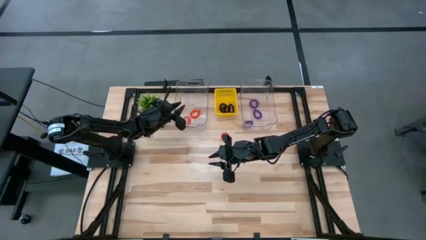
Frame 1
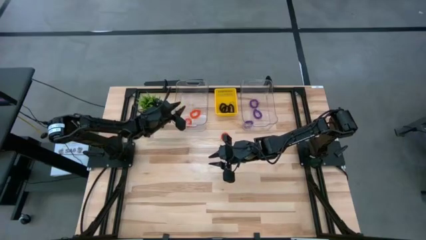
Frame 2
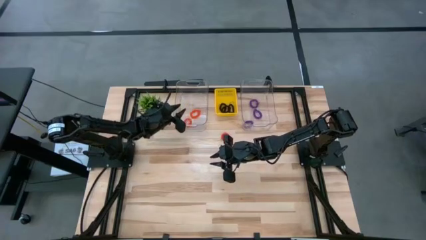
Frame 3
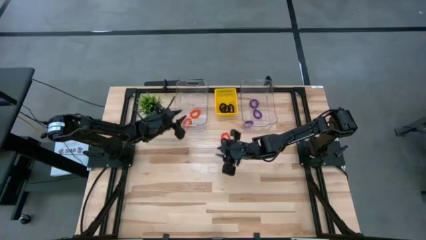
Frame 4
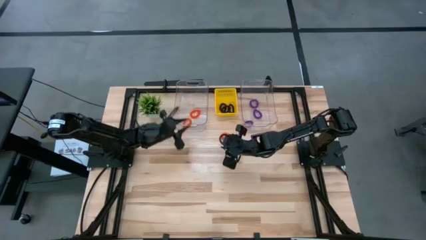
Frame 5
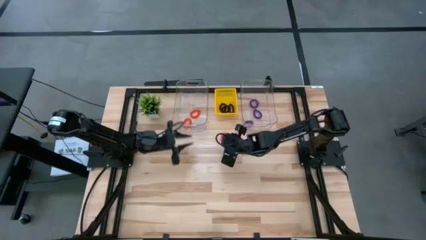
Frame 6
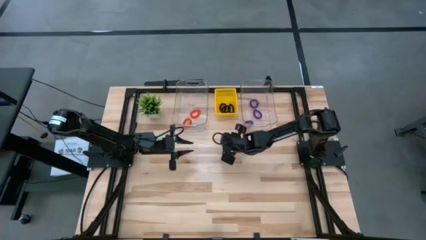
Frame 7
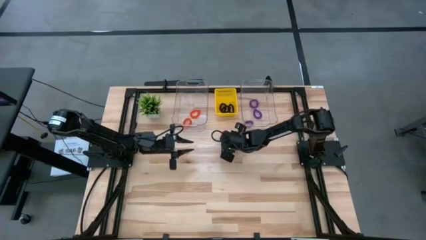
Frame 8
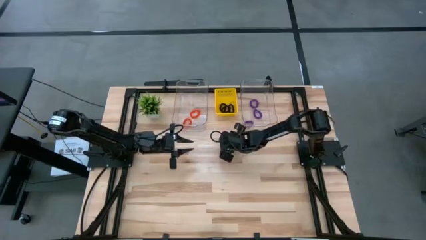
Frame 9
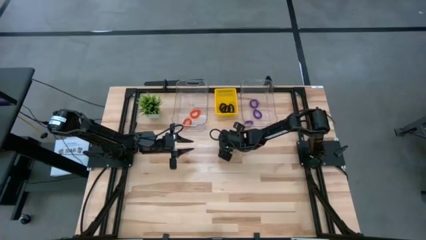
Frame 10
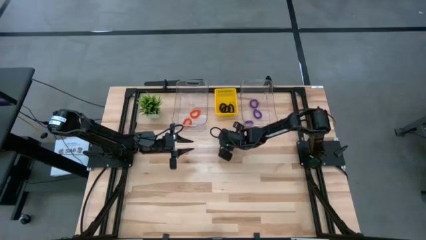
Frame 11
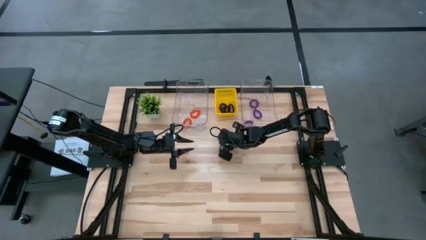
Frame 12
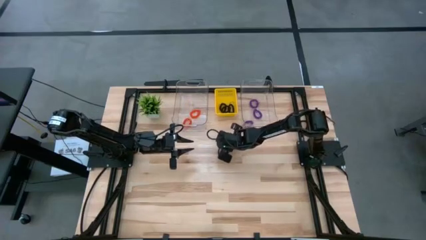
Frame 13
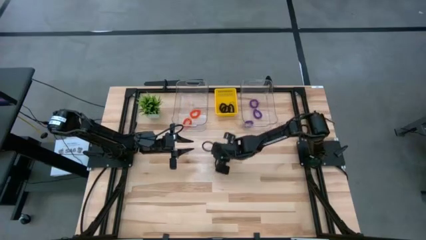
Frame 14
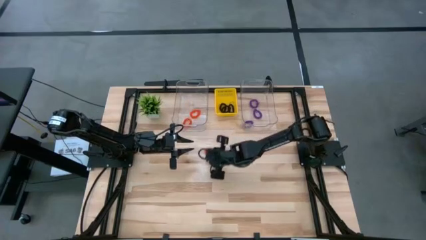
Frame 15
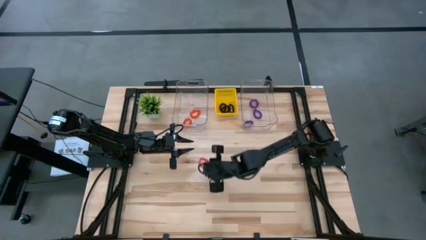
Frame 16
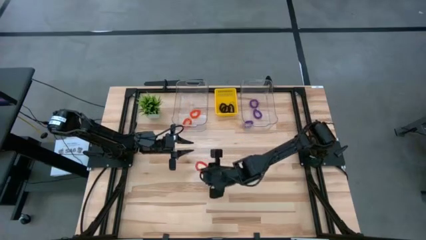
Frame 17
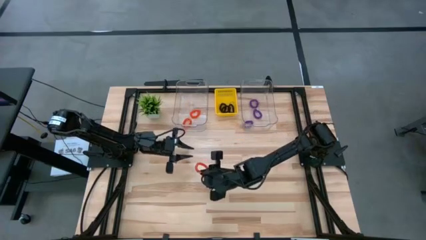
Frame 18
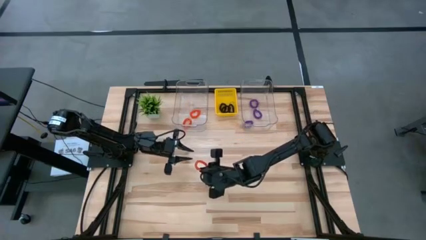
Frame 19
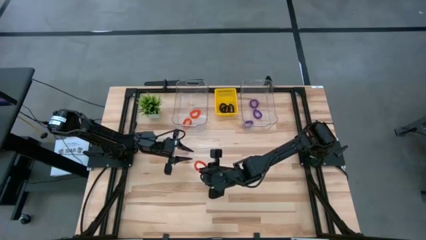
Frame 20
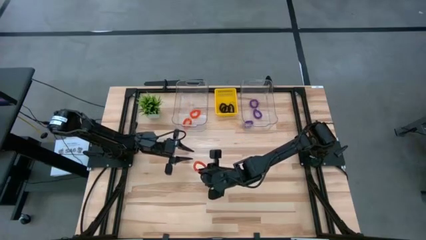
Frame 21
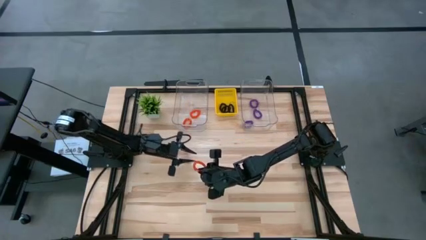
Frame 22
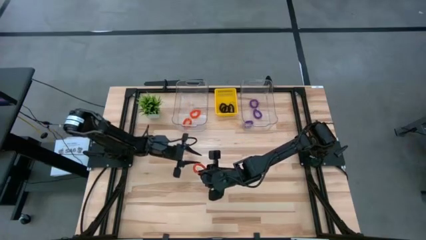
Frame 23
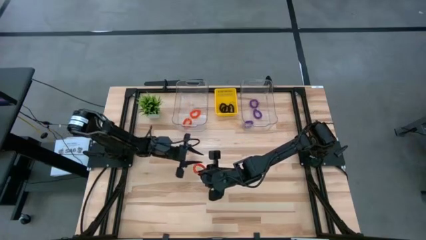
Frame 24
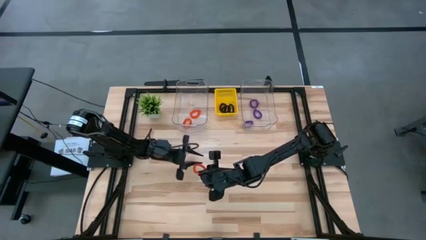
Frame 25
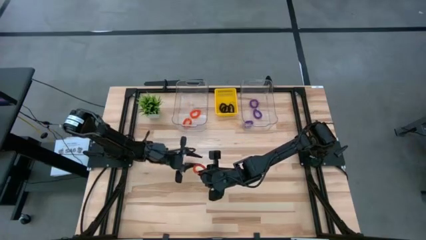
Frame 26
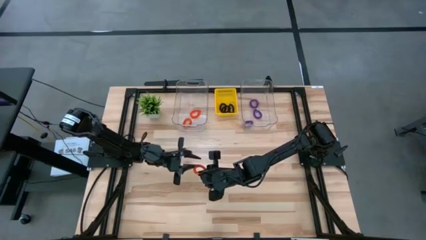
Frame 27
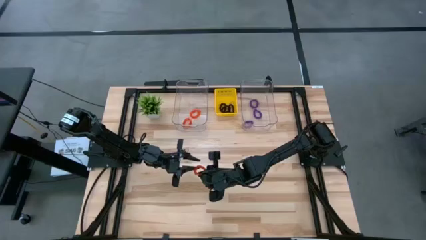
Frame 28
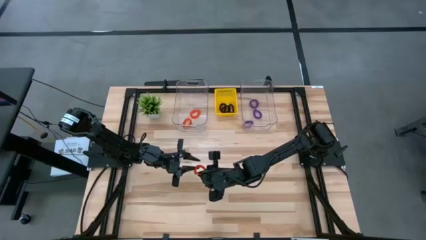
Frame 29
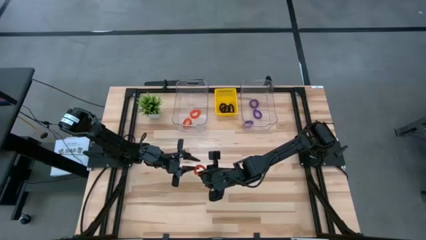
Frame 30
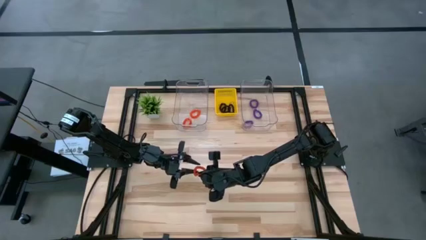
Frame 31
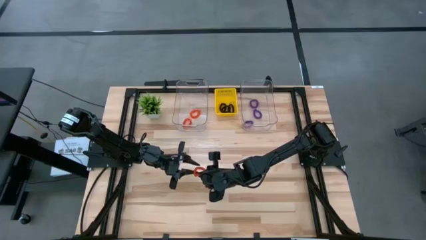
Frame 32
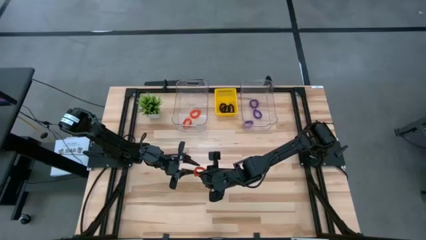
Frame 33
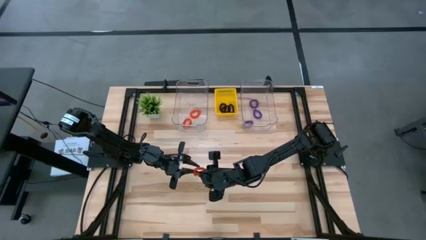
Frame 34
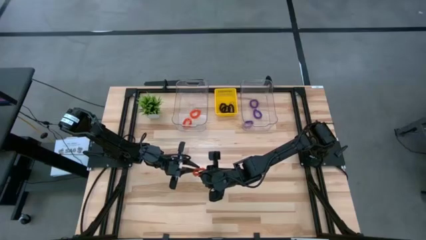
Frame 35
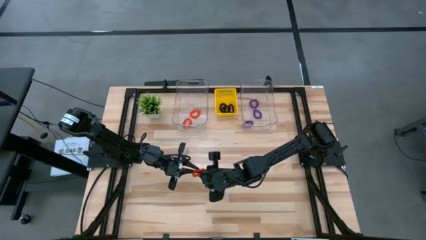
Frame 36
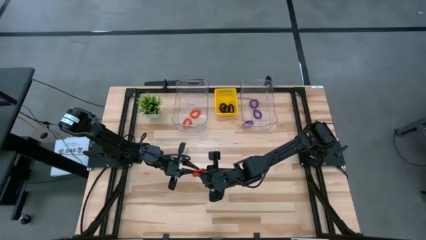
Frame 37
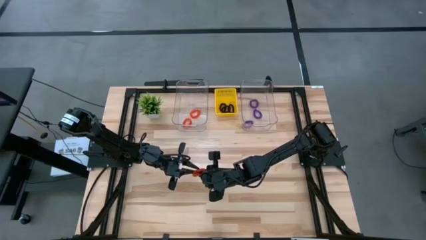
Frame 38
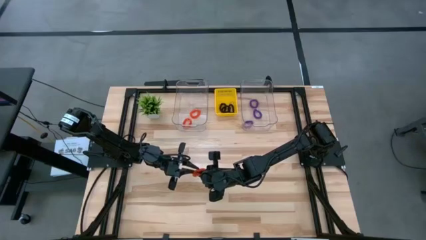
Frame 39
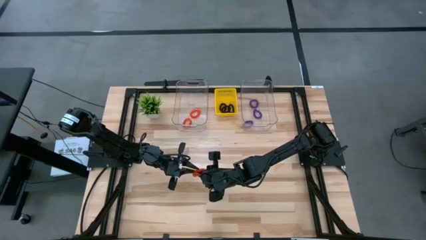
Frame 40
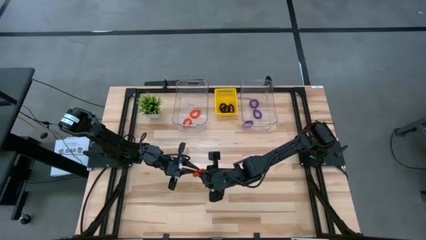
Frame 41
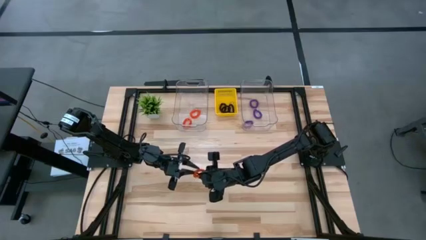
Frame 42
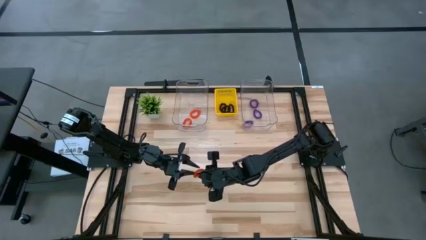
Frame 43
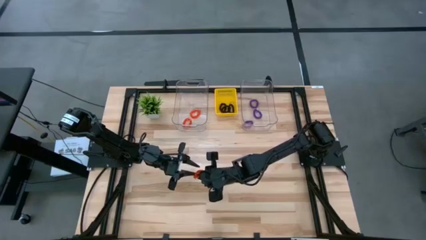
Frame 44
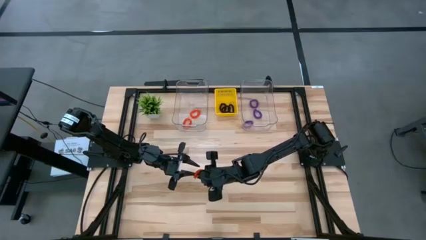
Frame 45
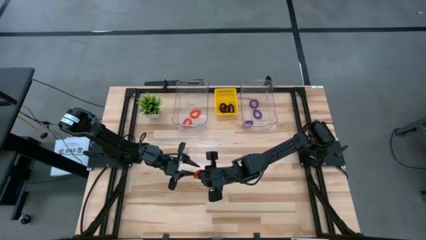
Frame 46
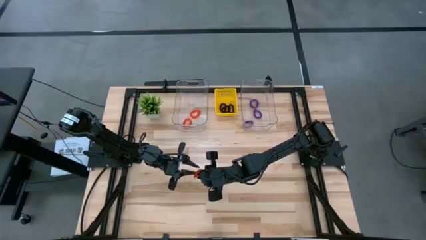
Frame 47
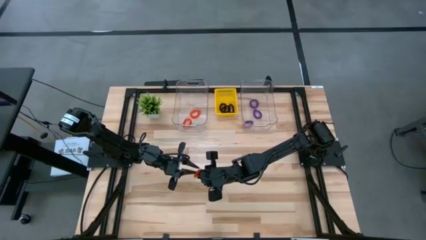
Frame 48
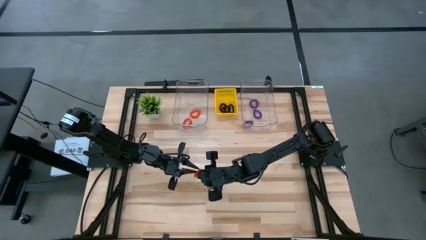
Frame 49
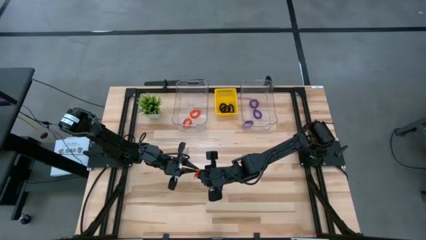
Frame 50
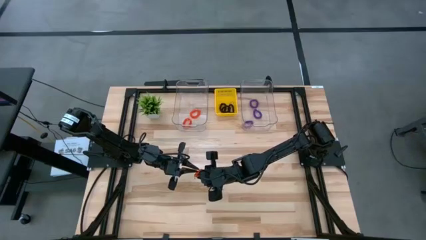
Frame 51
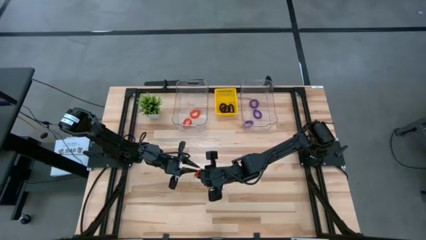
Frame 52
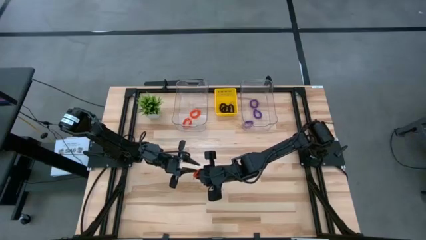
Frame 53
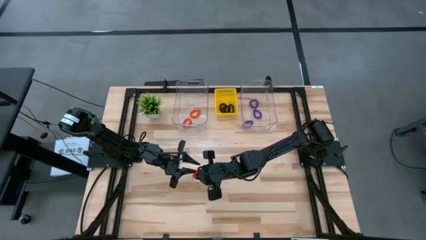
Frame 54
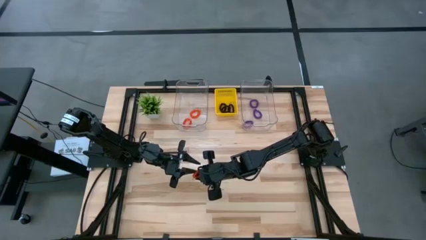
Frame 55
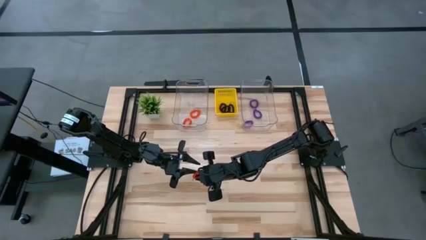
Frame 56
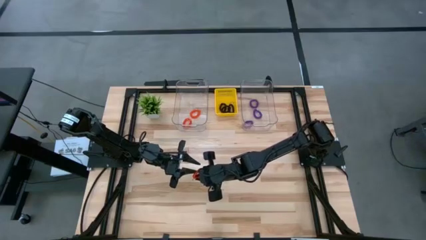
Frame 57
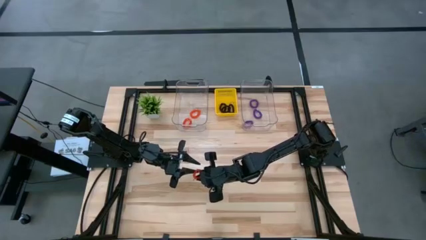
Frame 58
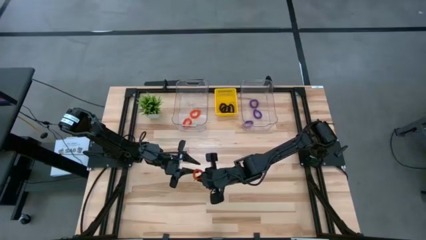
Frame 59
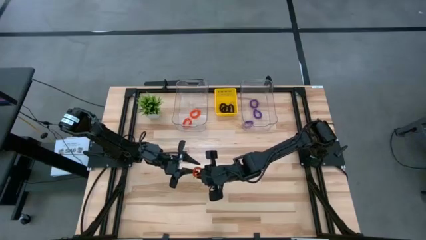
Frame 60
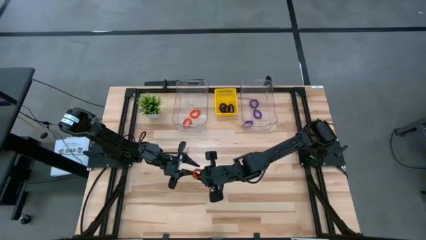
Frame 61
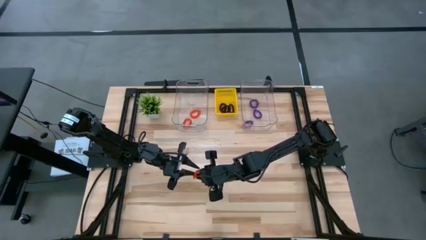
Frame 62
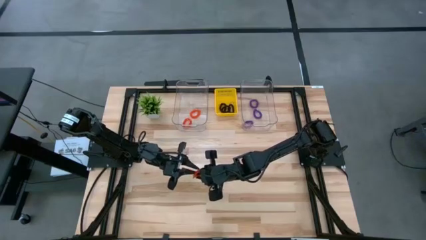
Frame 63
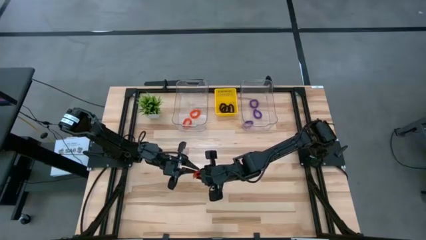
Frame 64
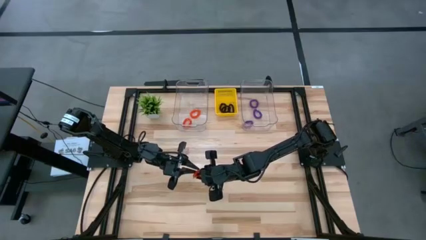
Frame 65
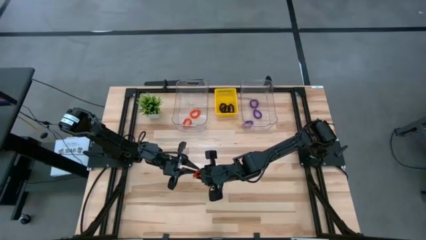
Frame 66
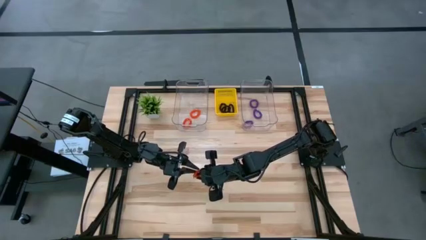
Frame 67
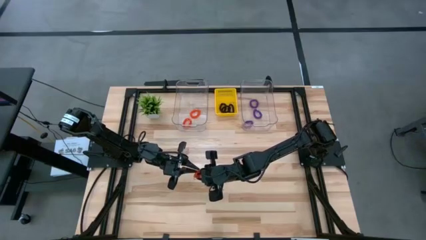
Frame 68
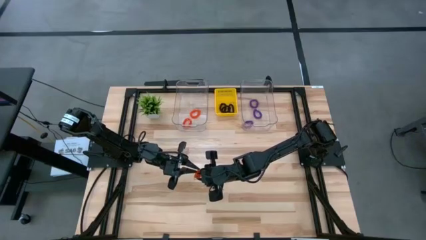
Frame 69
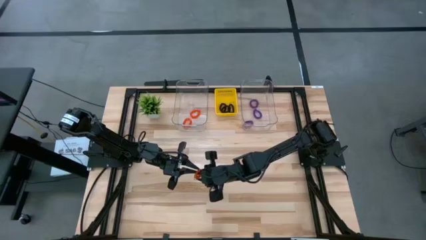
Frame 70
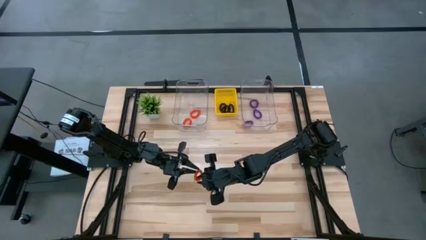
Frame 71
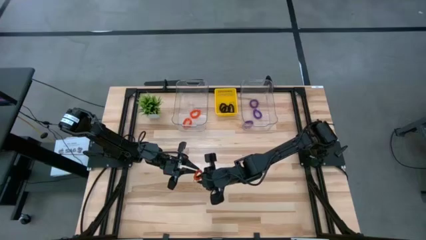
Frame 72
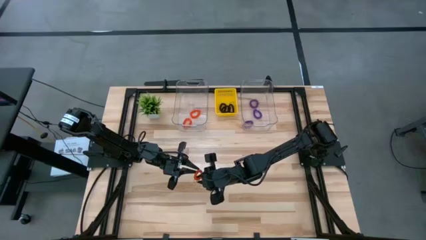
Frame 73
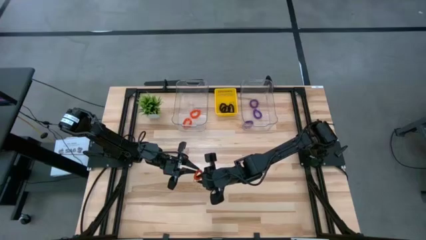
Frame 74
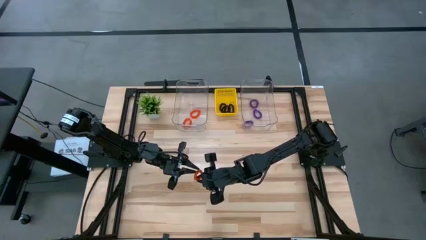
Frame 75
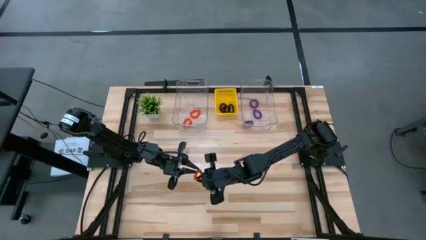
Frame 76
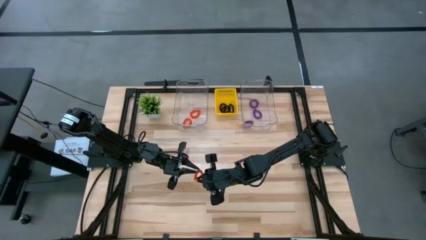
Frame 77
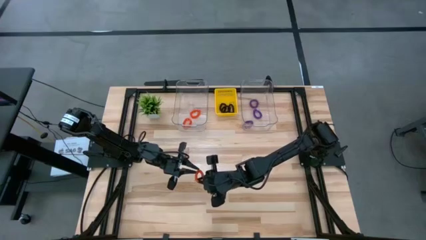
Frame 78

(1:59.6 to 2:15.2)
Task: Sort spring keychains
Put the orange spring keychain into the left transparent bin

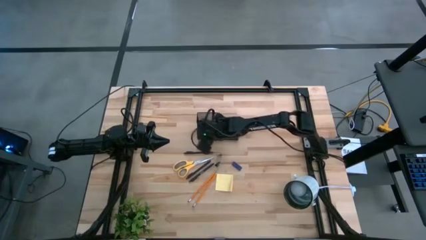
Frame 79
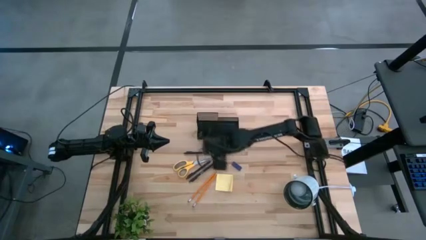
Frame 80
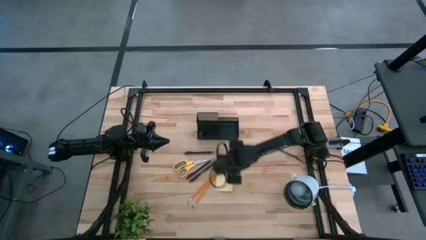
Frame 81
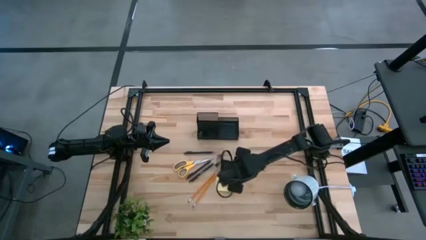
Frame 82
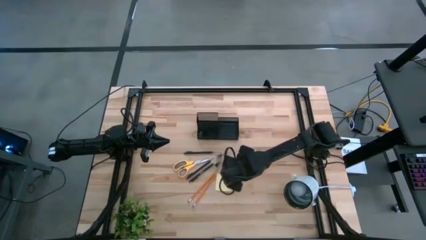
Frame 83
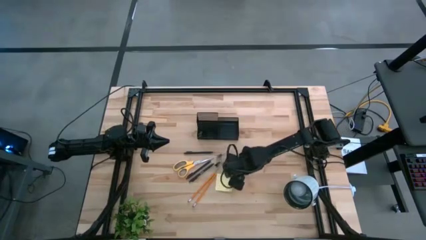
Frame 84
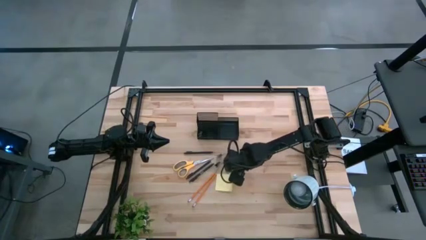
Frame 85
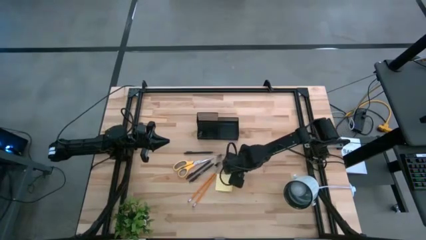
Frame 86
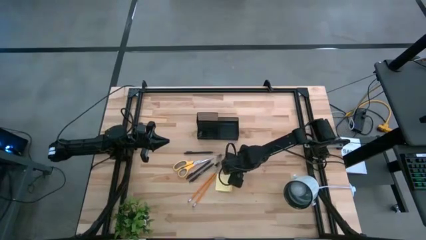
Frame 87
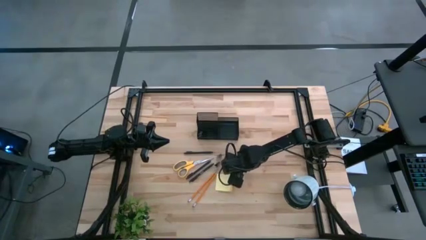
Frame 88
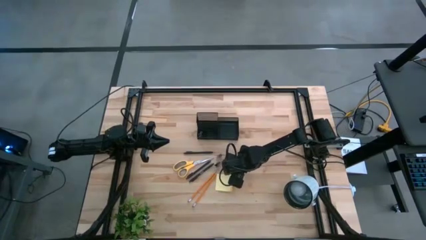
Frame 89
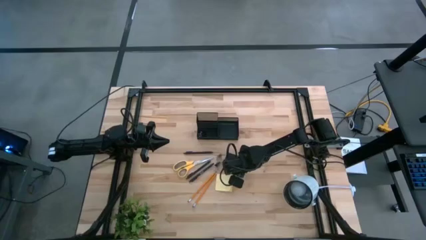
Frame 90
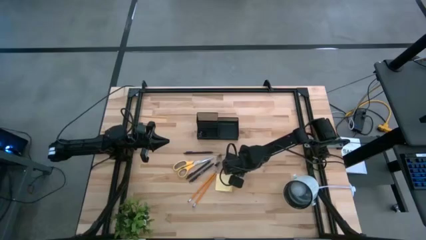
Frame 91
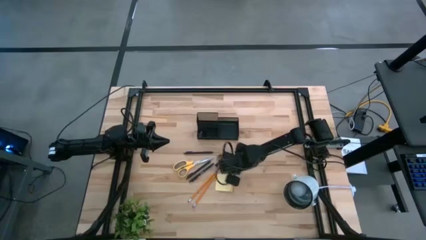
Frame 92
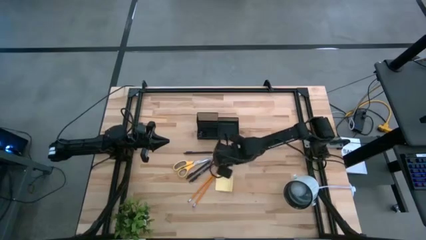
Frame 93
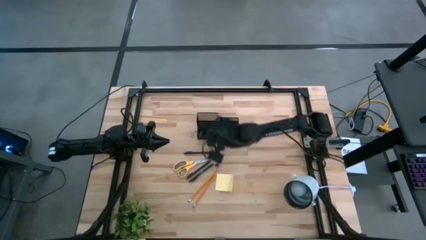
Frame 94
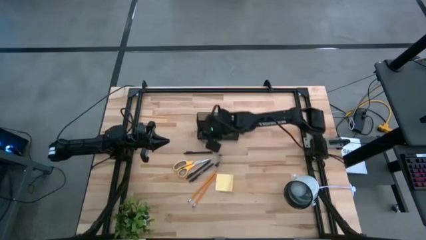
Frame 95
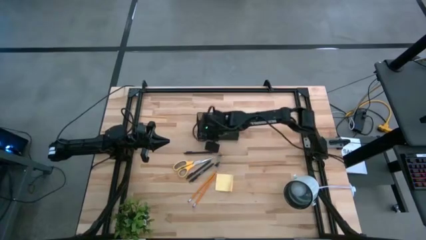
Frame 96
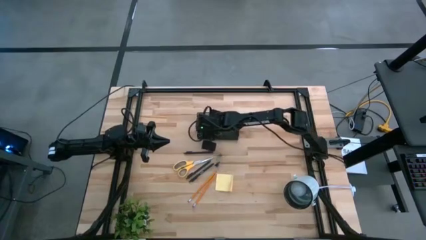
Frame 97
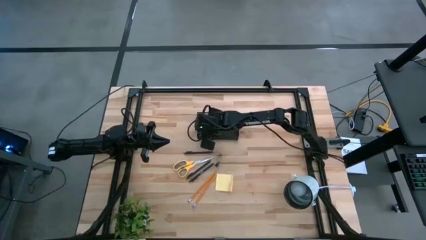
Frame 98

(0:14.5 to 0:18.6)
Task: Pick and place office supplies into organizer
Put the violet eraser into the black organizer bin
